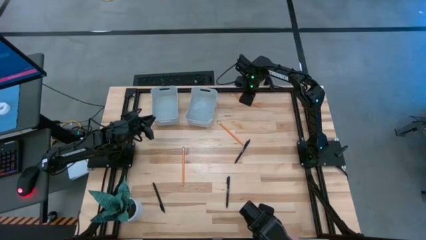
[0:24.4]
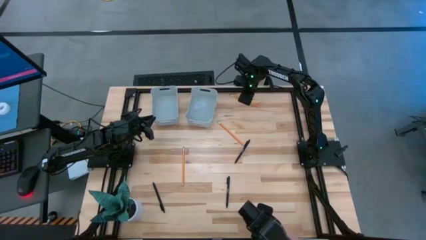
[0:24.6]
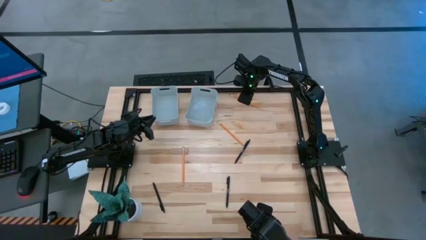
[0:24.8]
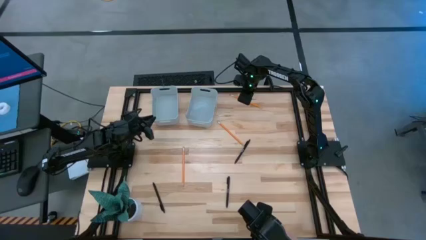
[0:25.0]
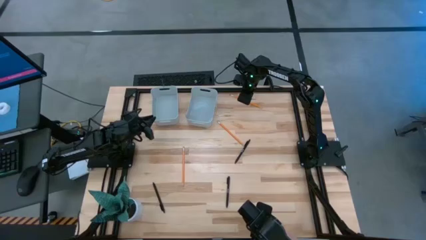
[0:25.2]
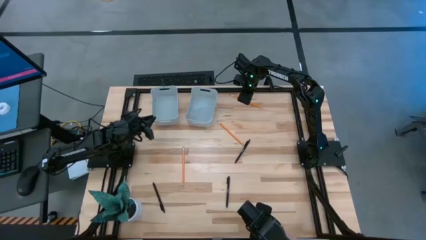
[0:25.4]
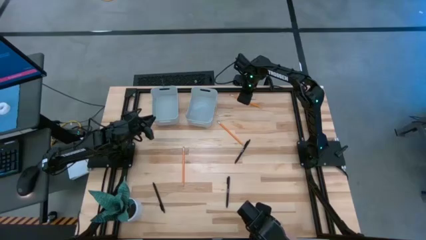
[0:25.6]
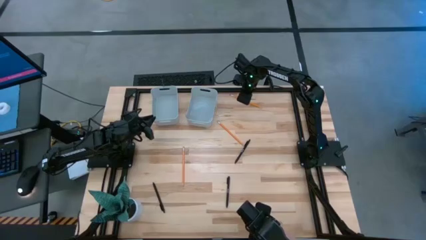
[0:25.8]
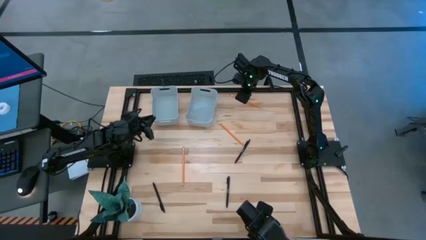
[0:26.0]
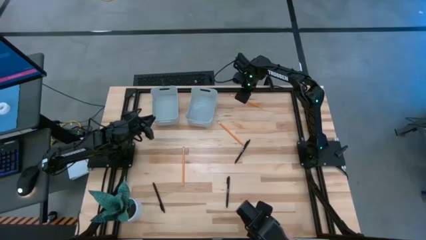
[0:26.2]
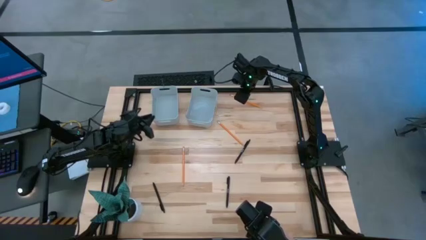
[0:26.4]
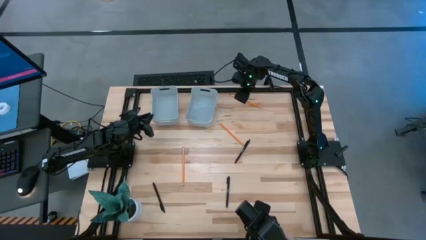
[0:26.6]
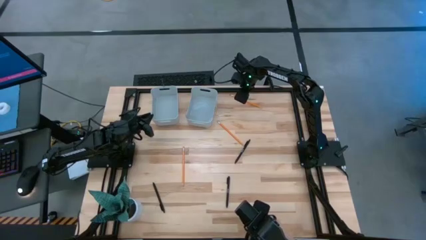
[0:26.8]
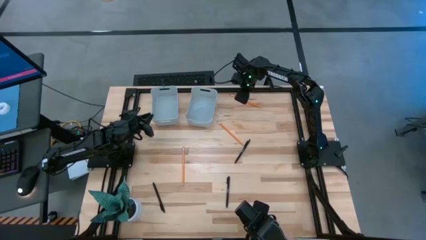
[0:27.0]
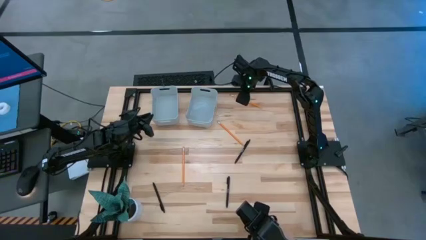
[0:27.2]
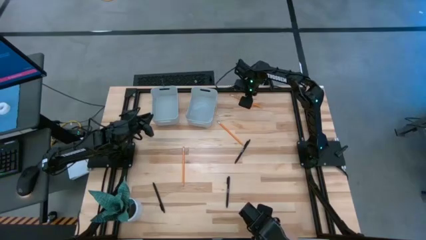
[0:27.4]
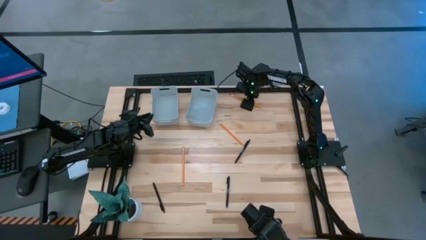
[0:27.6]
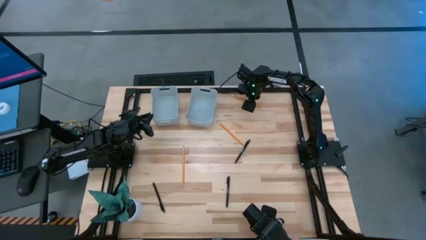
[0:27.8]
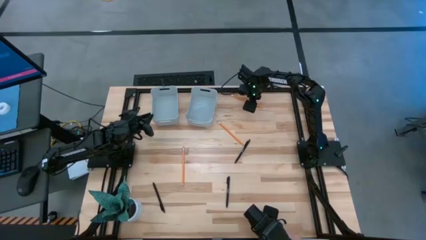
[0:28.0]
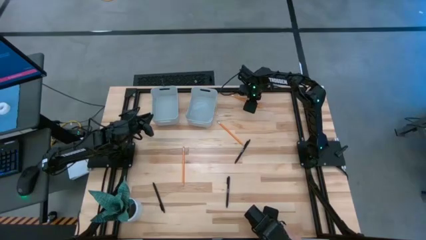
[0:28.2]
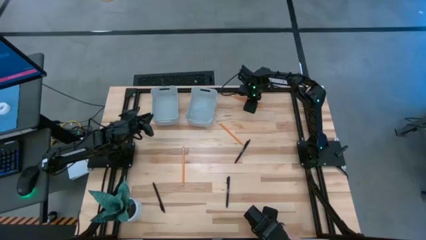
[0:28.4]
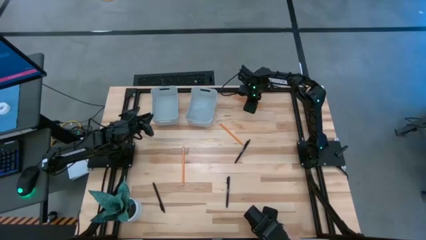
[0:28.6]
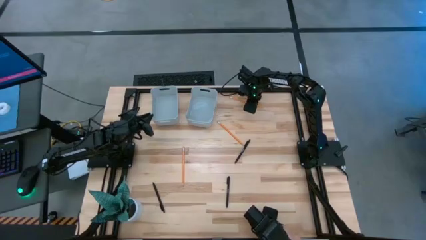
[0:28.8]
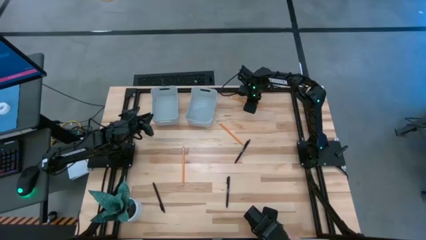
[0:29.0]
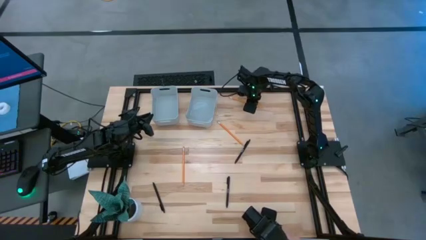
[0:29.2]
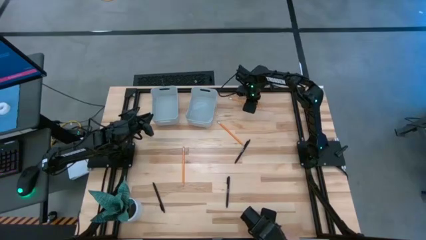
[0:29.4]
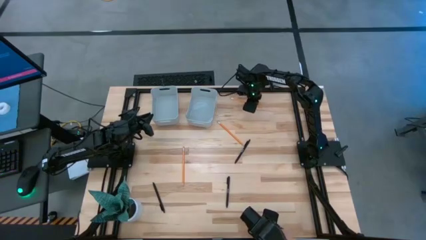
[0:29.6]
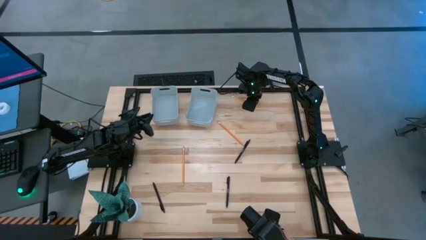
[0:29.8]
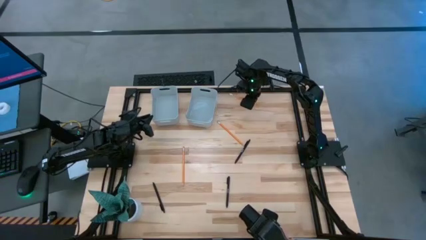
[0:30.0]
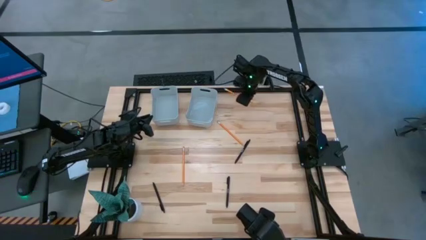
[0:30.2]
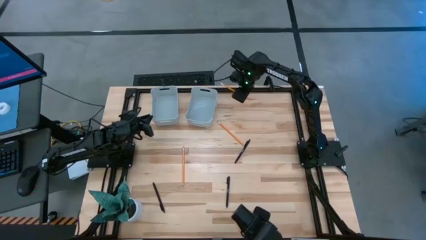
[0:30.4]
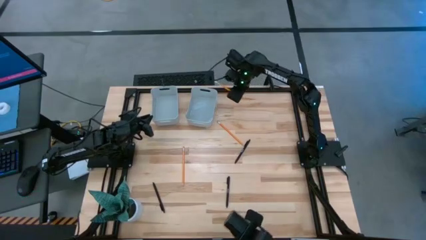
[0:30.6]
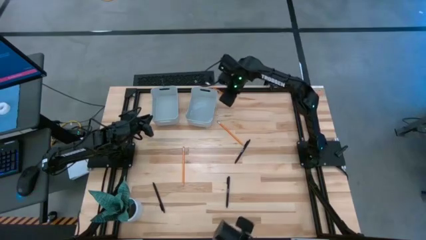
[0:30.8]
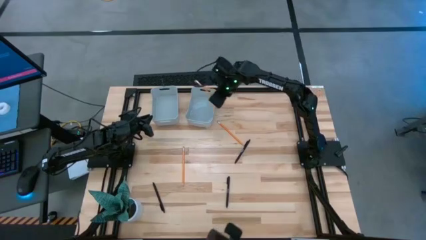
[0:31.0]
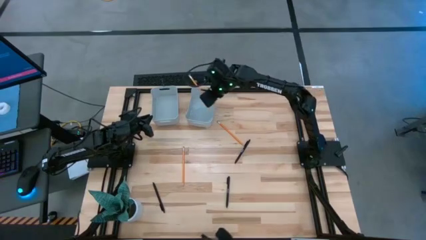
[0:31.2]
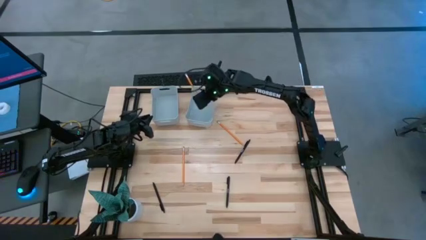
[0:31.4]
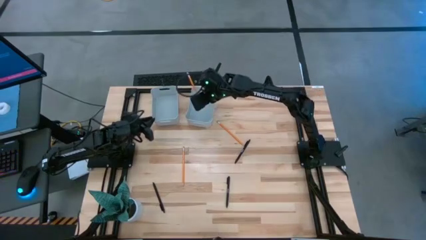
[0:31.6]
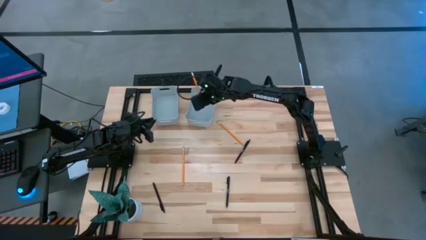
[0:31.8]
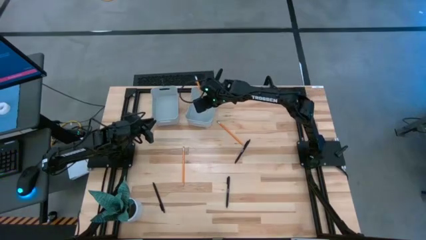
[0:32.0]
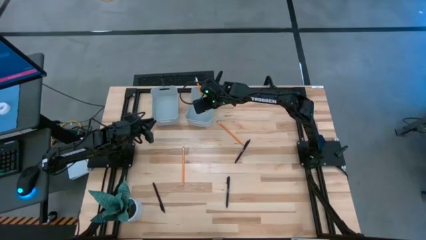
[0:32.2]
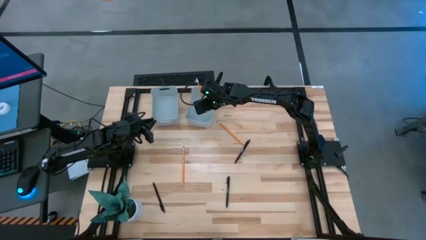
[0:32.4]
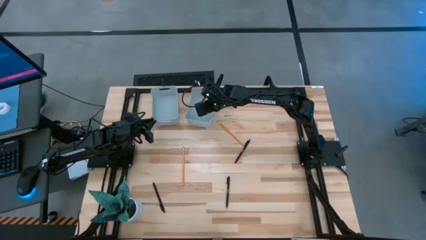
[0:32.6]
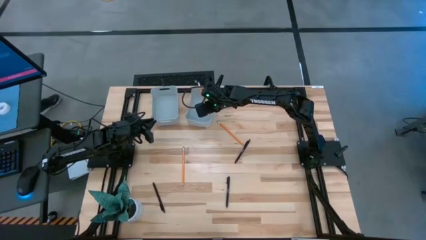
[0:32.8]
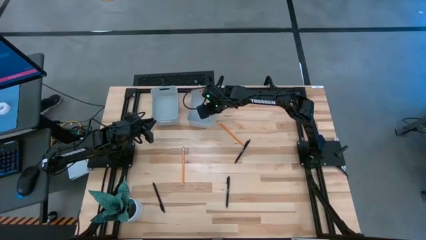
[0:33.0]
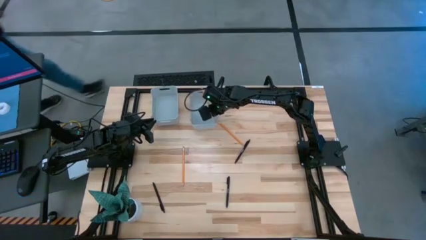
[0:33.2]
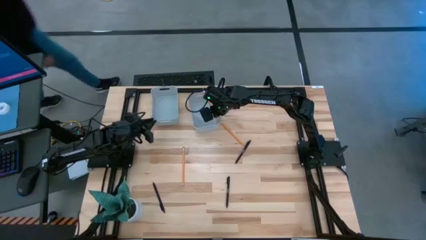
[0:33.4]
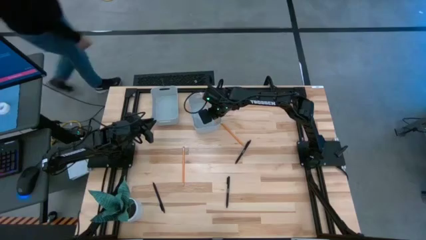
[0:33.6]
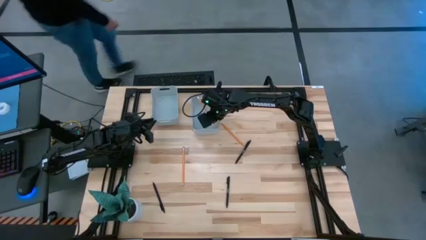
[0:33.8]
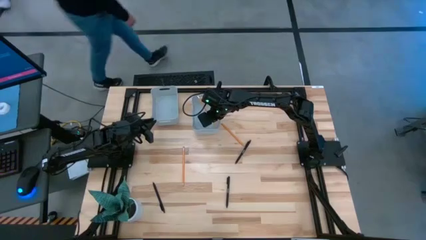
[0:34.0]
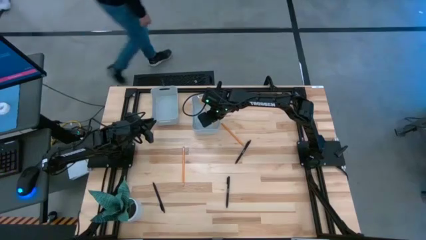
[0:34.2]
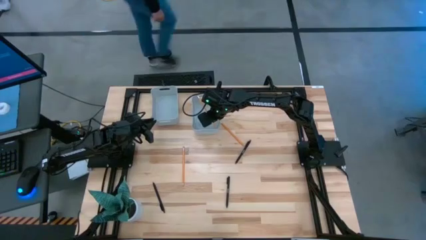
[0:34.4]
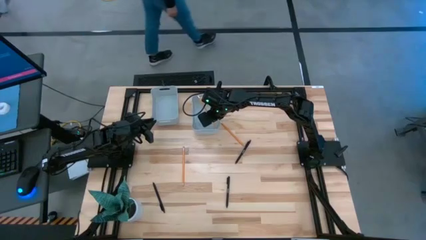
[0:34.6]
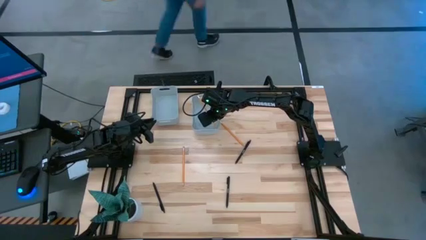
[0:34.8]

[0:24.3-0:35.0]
Task: Sort pens & pencils
Put the top orange pencil into the right gray bin
